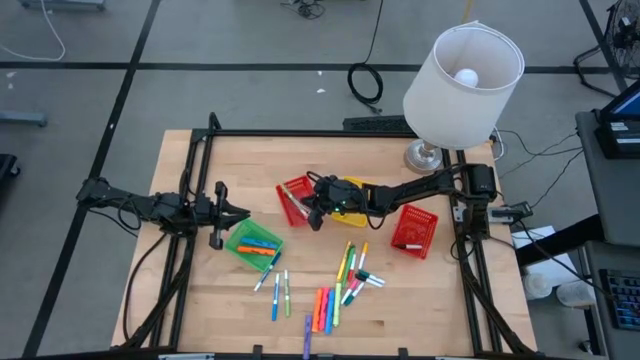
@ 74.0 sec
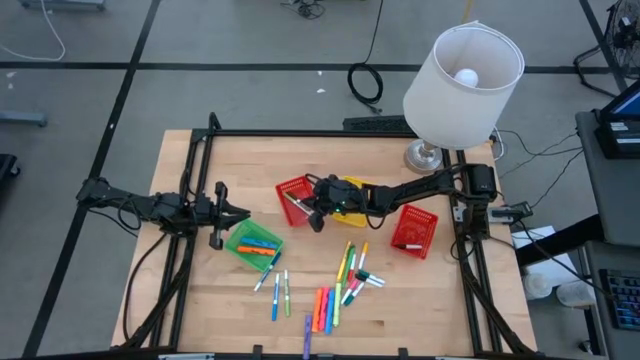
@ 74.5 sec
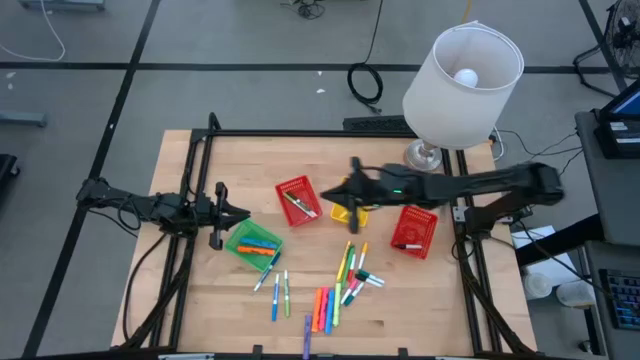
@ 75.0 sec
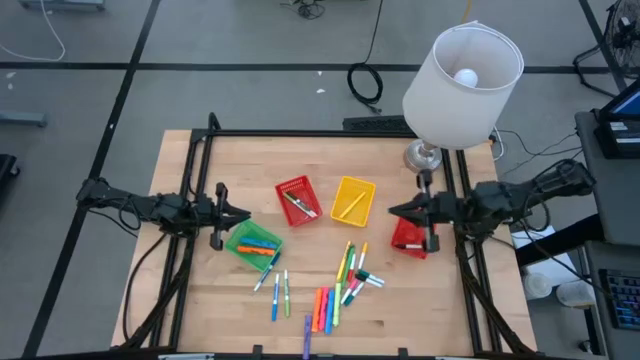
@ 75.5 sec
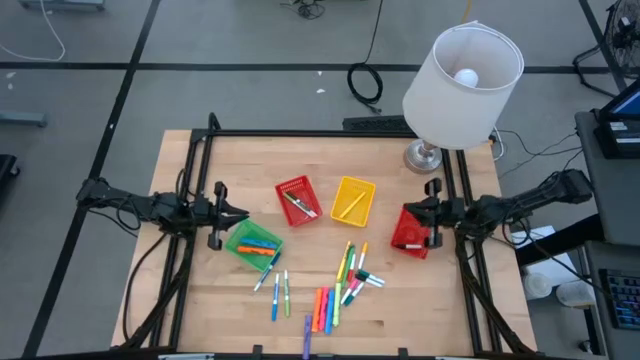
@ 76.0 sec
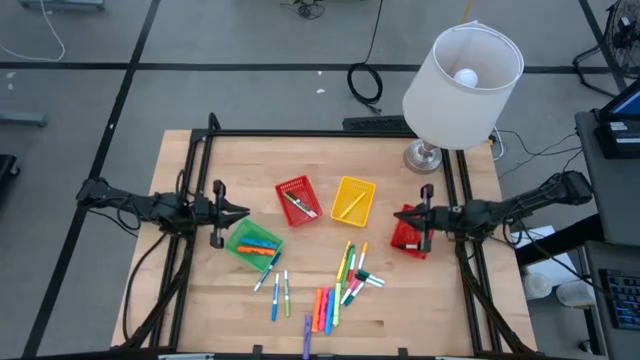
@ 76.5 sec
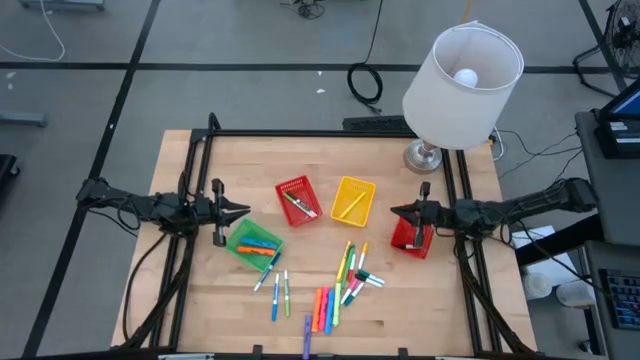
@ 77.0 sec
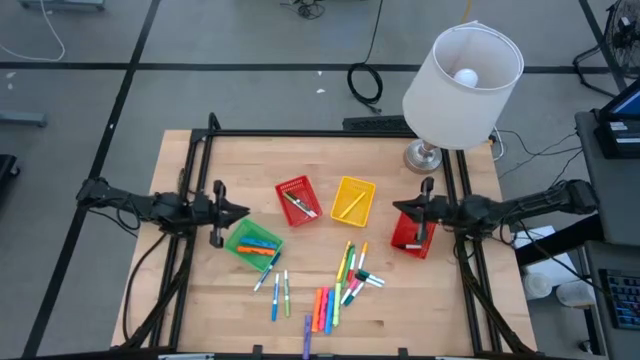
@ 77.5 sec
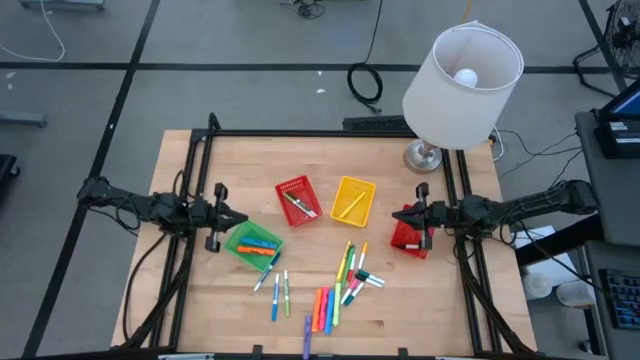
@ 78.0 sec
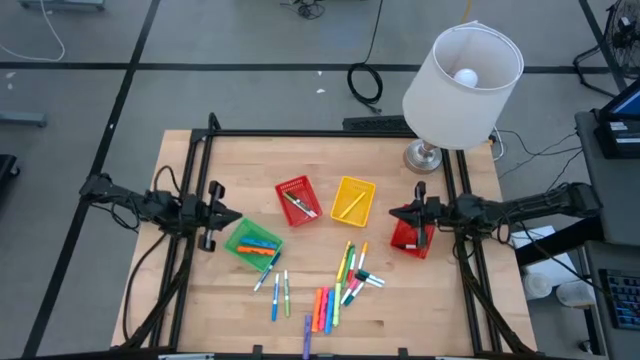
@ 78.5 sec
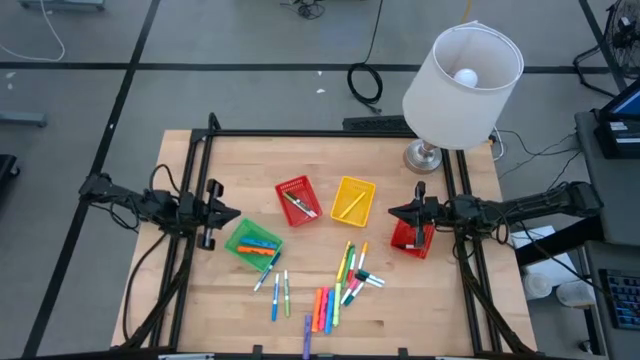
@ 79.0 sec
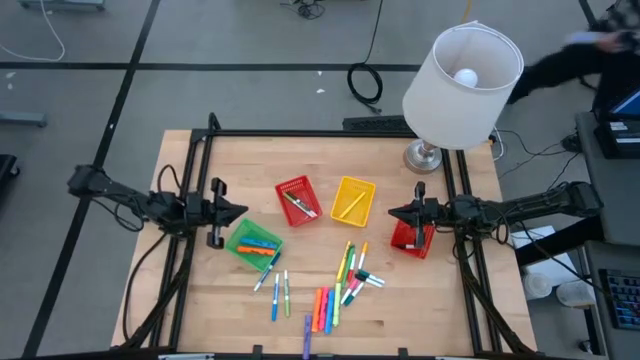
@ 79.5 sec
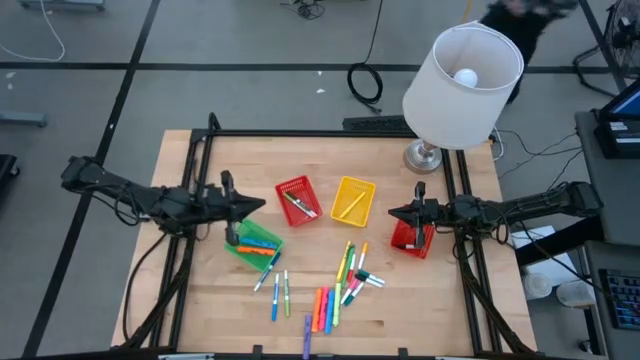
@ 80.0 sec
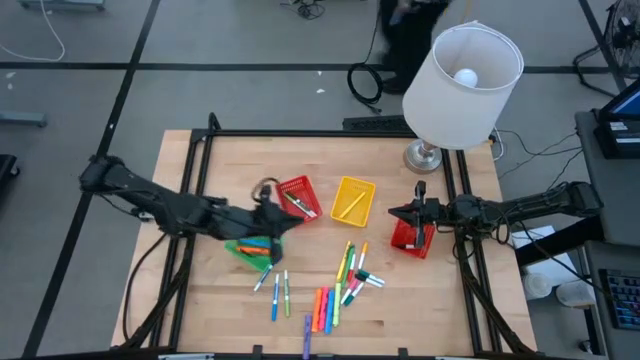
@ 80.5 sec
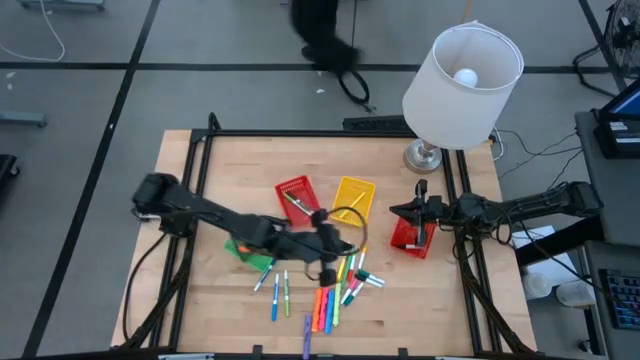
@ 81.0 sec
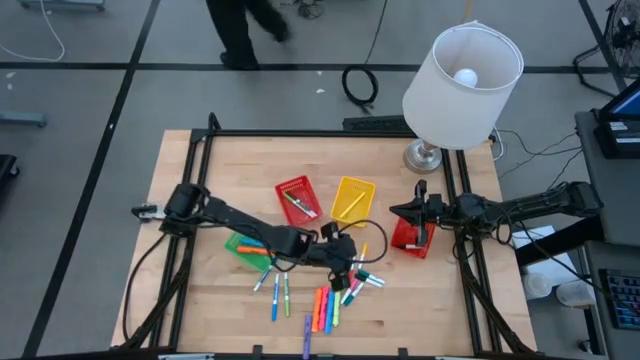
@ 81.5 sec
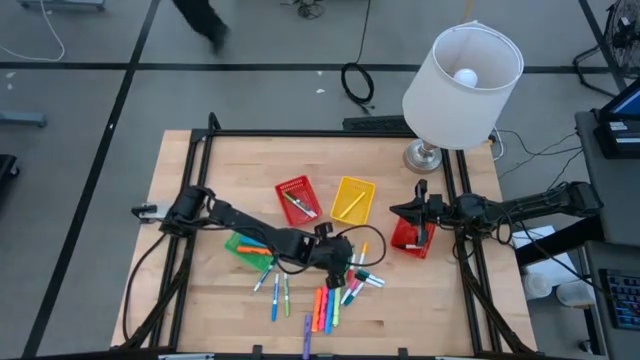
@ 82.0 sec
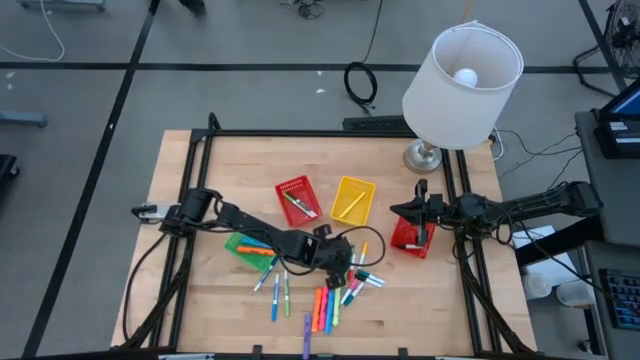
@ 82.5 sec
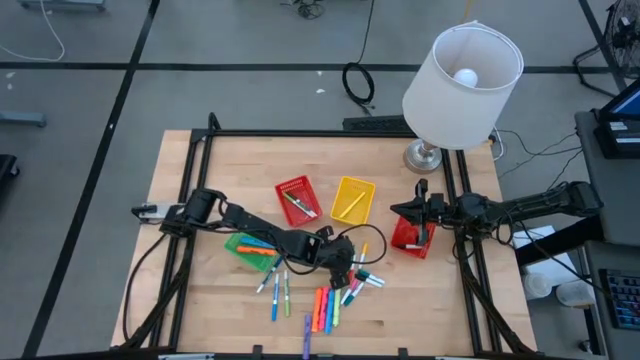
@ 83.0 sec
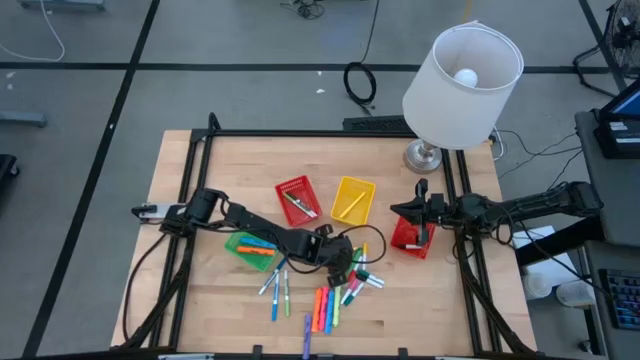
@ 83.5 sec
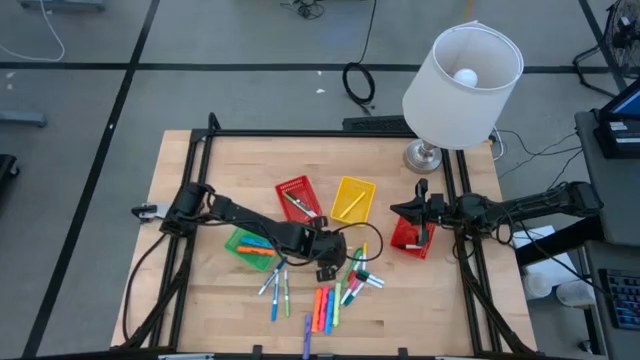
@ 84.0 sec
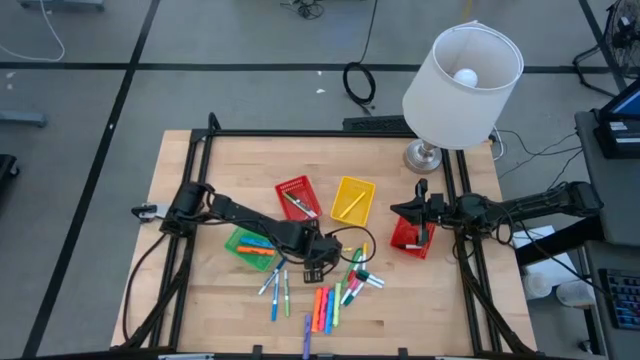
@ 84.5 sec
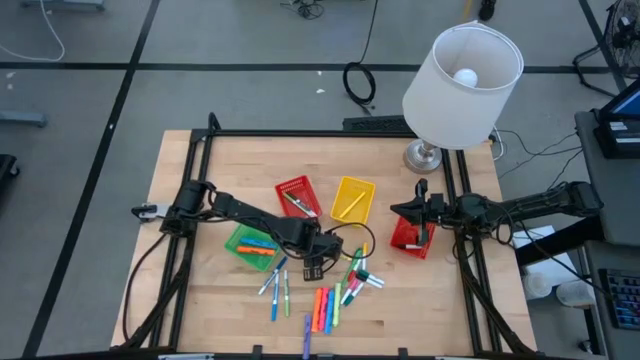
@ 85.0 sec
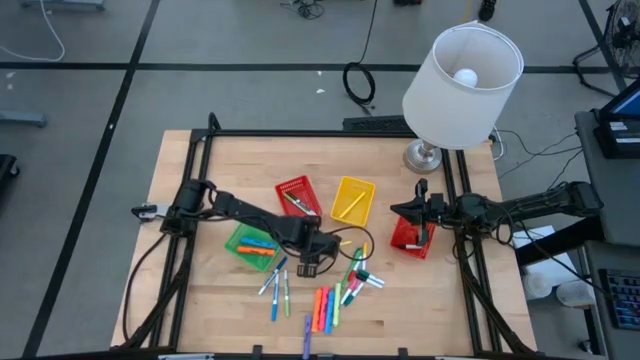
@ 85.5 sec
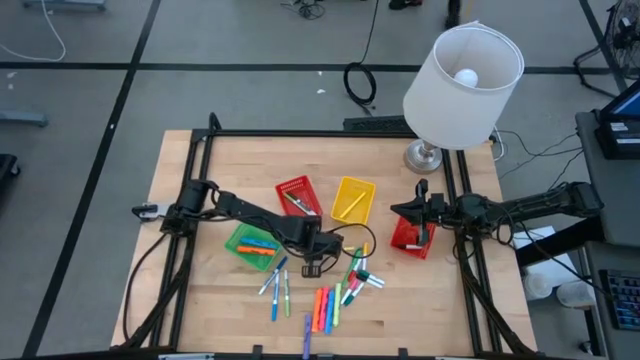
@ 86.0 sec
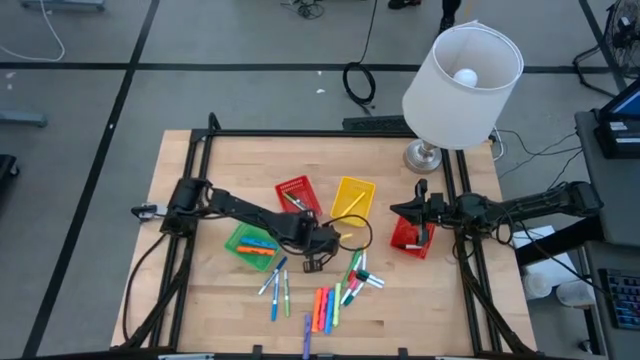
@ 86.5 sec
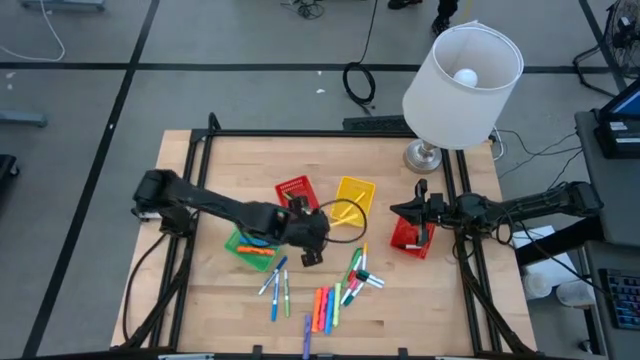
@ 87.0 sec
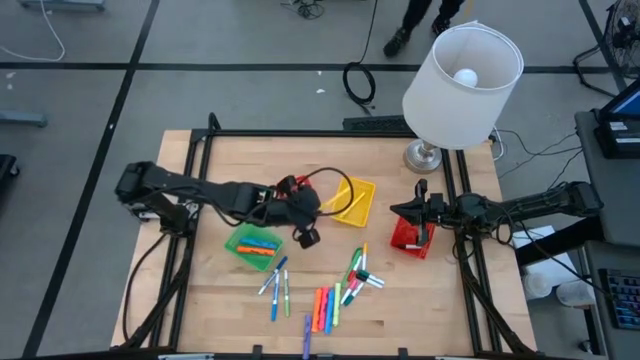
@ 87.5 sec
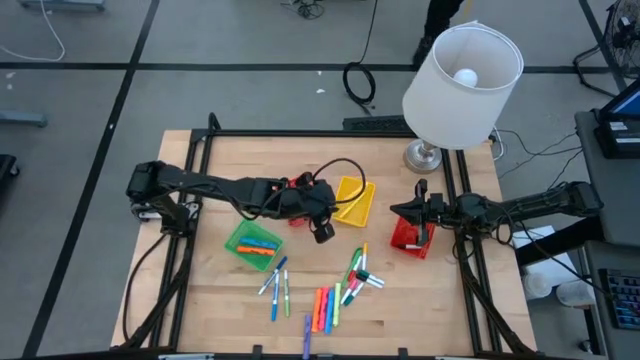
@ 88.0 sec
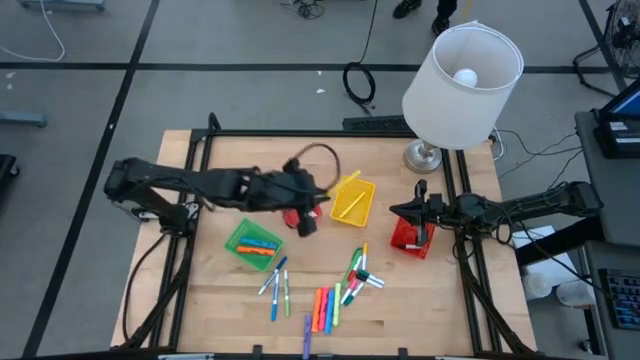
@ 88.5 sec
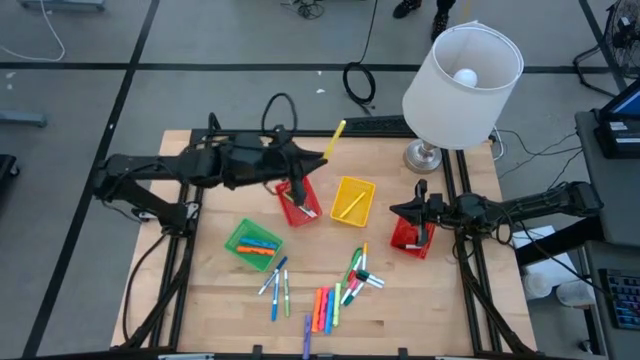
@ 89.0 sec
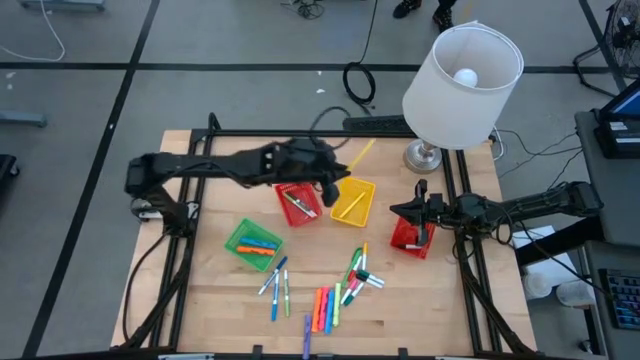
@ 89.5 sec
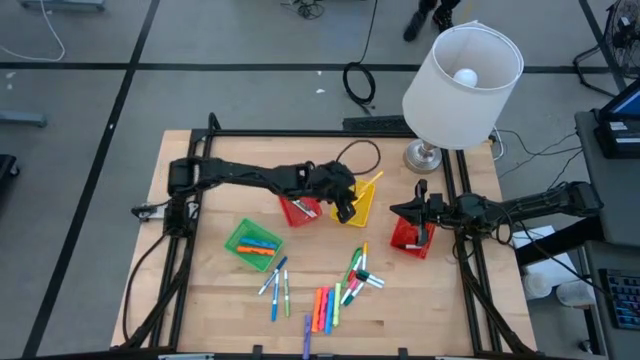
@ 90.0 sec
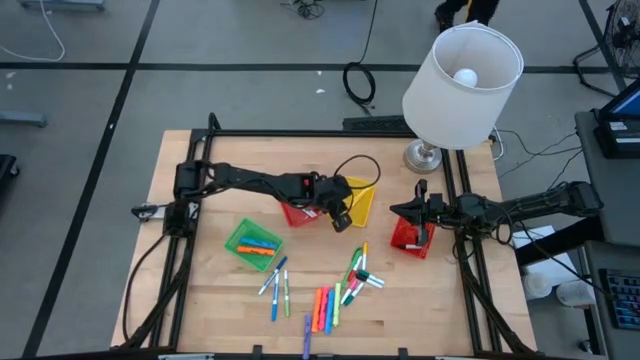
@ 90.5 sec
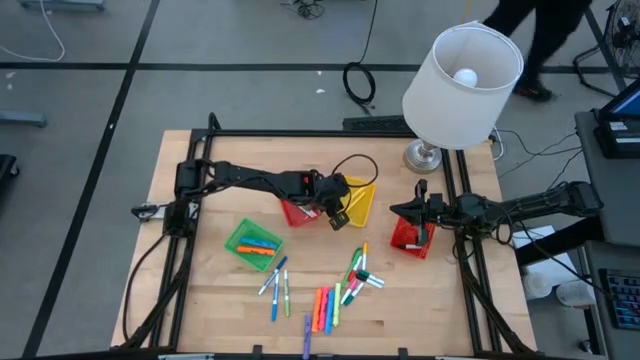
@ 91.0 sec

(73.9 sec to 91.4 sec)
Task: Pick & Place Markers
Put the yellow pen into the yellow bin

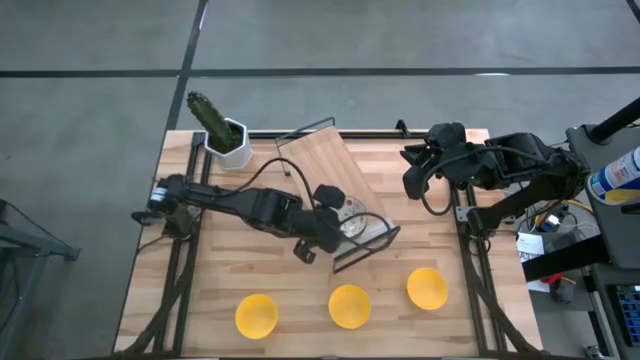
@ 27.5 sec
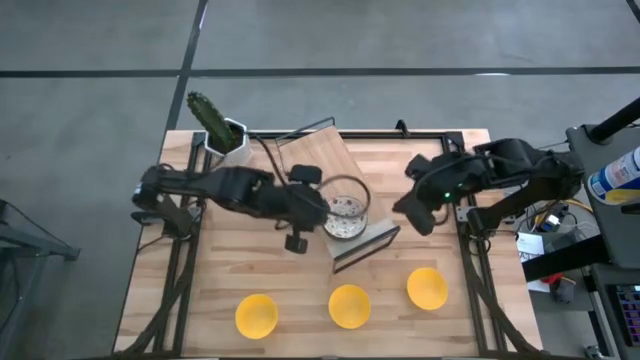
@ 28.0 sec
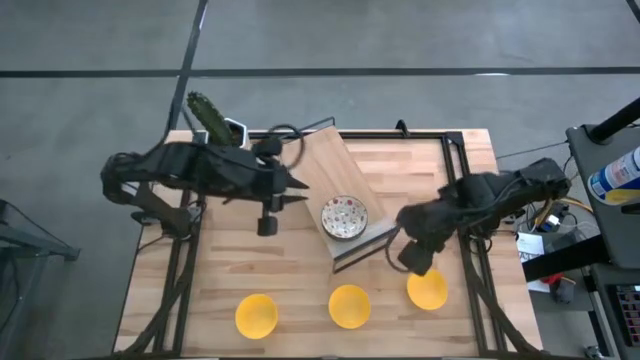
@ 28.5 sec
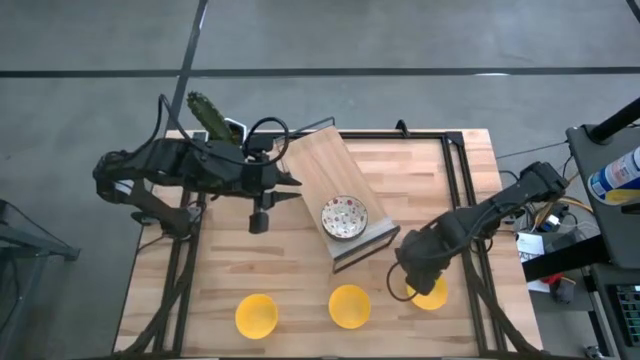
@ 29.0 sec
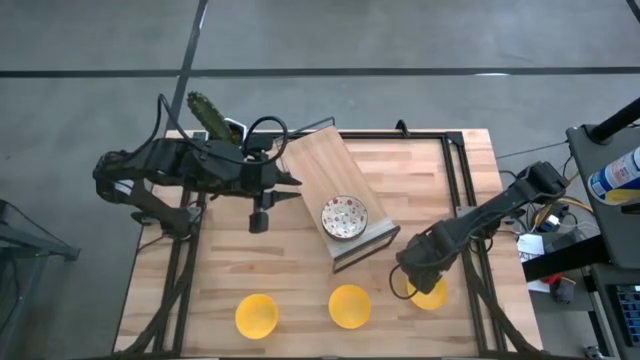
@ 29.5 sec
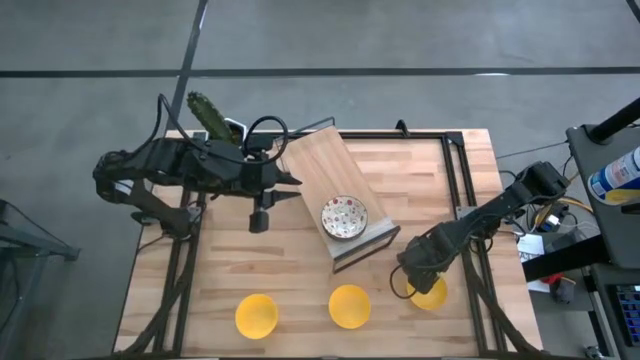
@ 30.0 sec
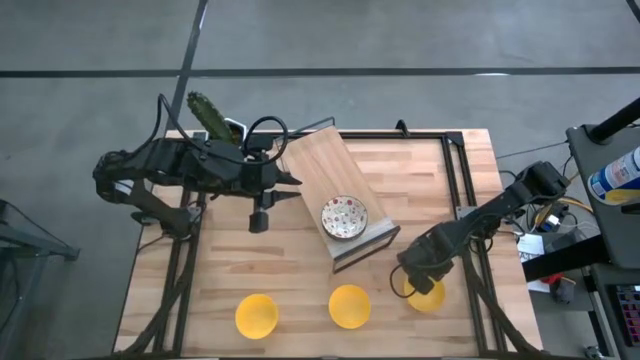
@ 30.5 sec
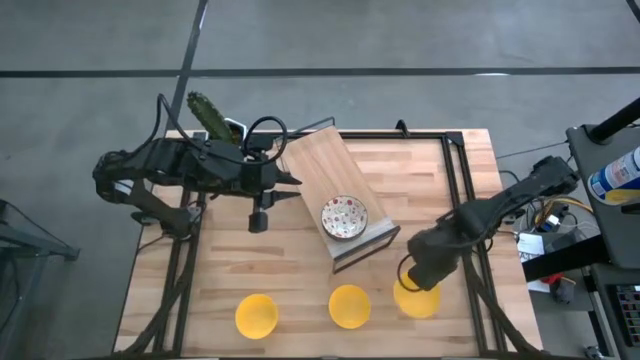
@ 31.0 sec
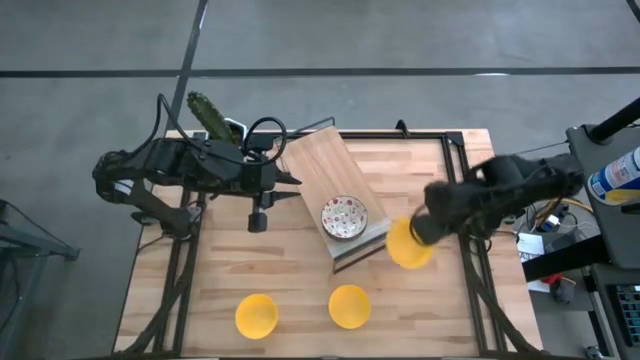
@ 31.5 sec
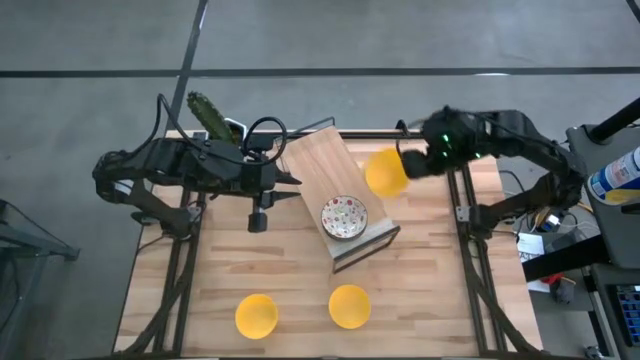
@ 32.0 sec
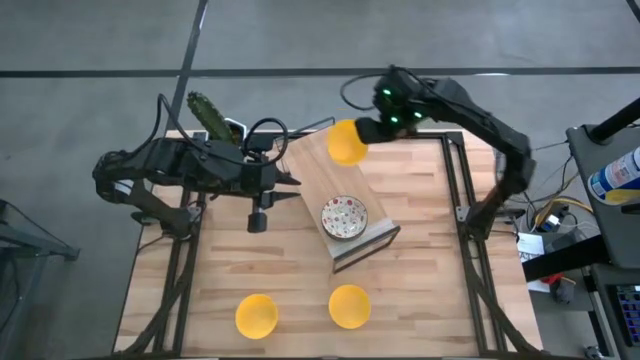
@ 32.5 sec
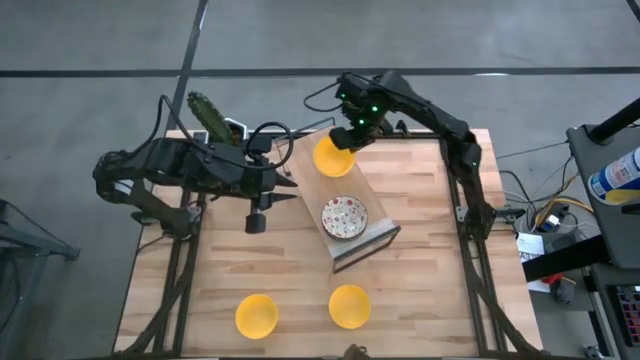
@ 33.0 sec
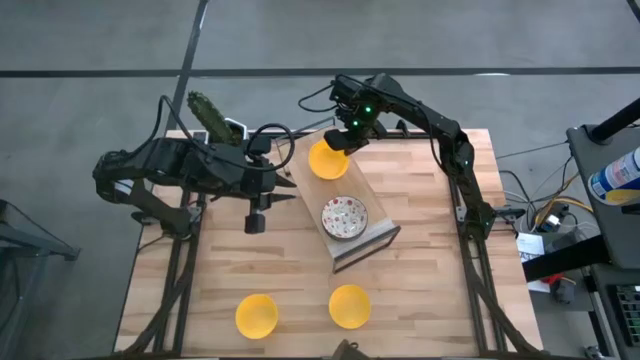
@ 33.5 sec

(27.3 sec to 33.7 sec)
Task: Pick & Place Mini bowls
Put the right yellow bowl on the shelf
